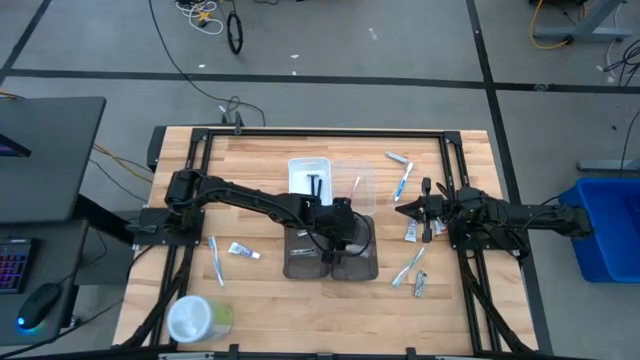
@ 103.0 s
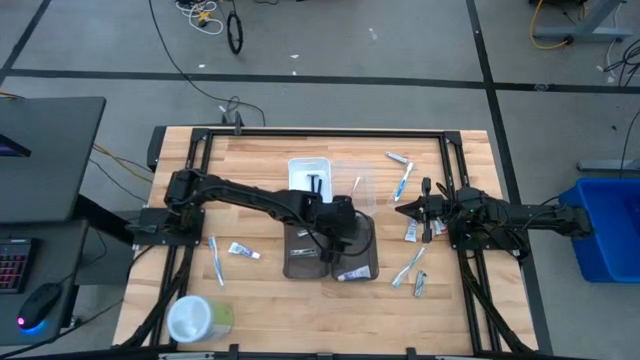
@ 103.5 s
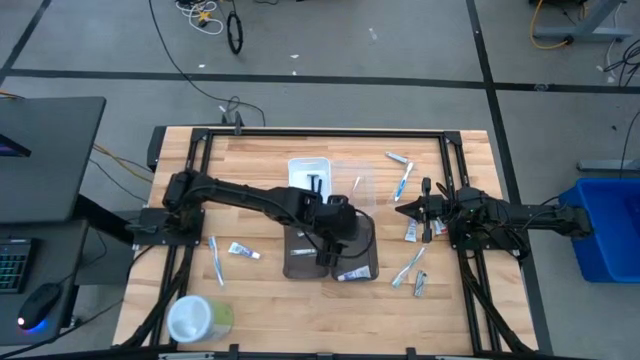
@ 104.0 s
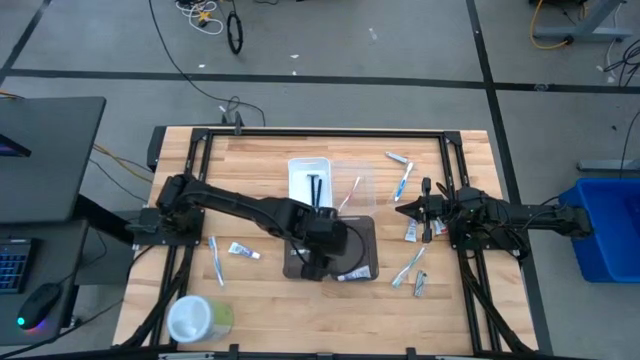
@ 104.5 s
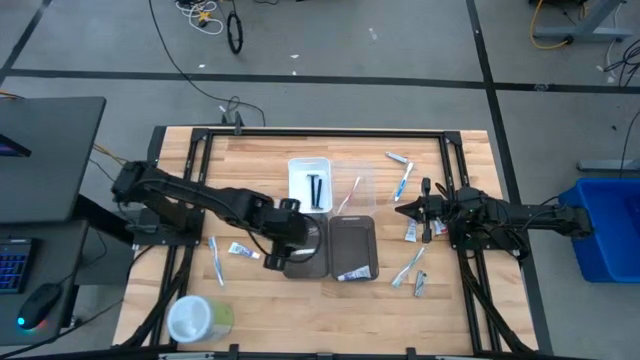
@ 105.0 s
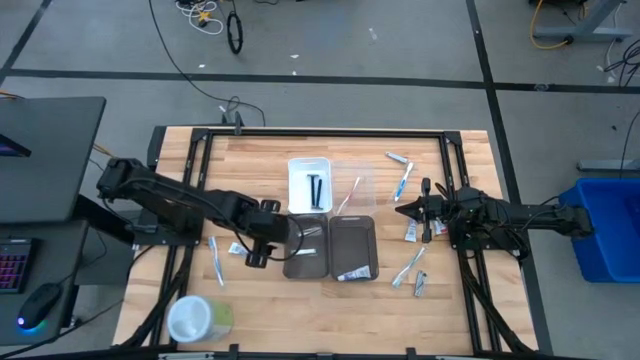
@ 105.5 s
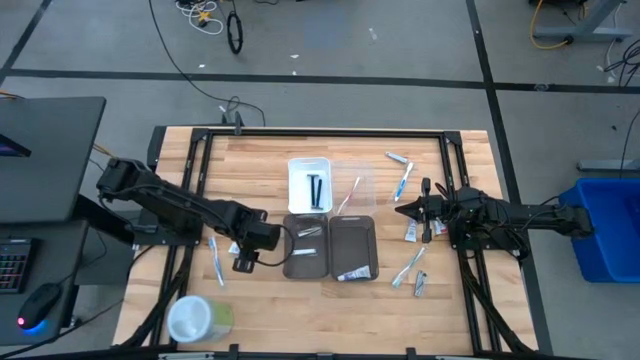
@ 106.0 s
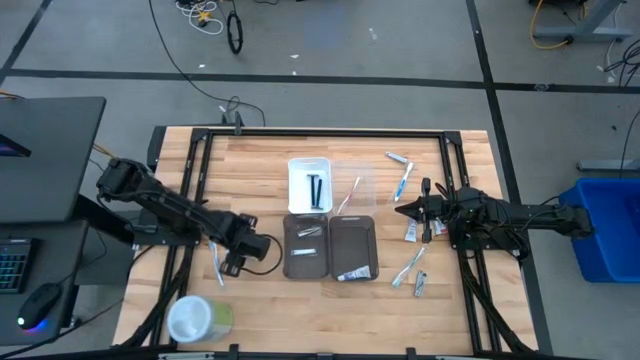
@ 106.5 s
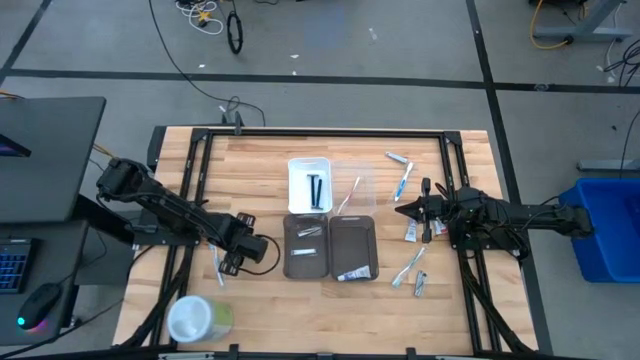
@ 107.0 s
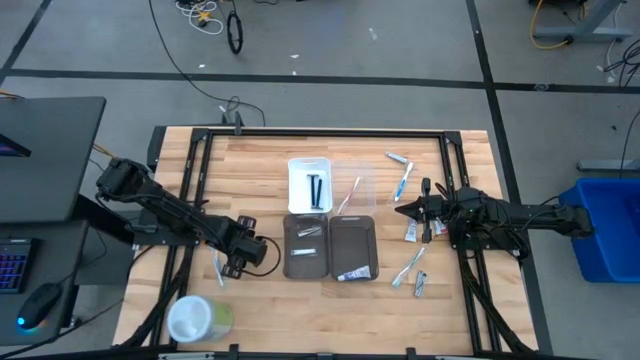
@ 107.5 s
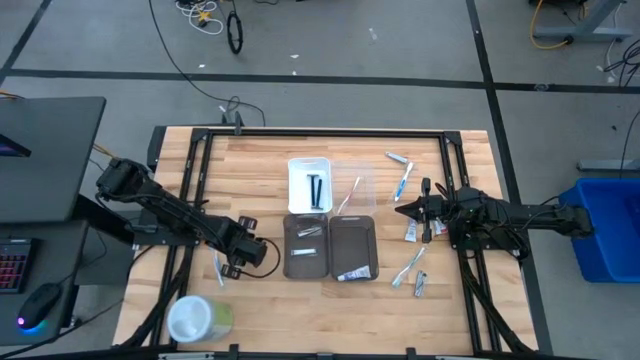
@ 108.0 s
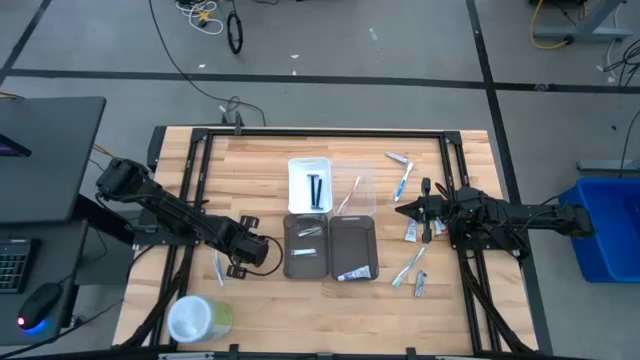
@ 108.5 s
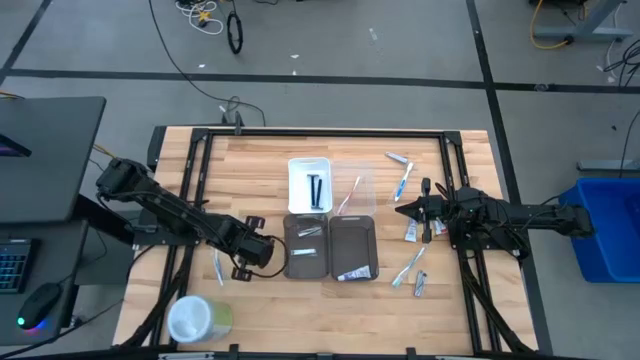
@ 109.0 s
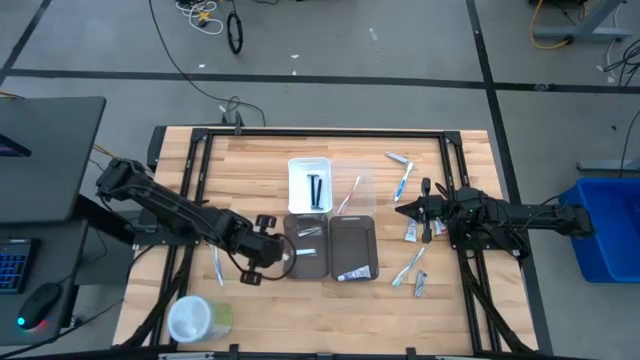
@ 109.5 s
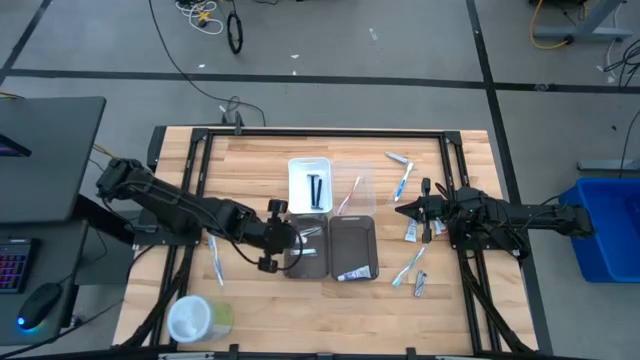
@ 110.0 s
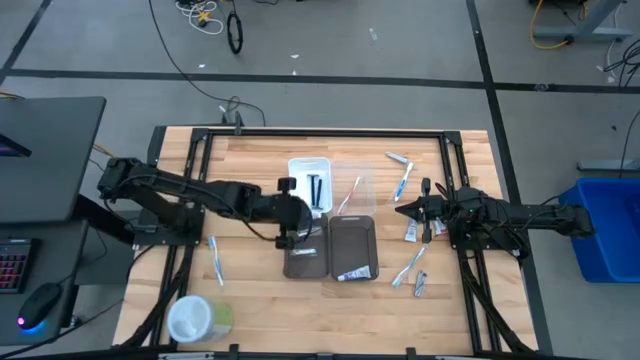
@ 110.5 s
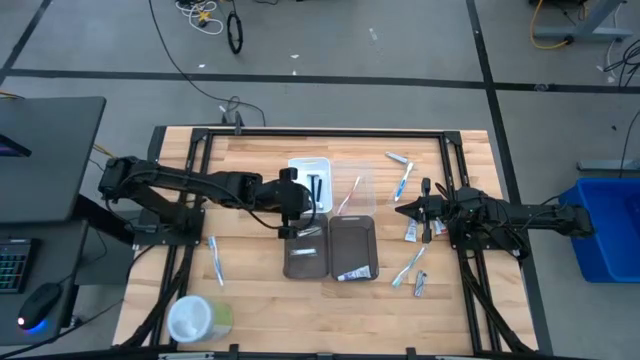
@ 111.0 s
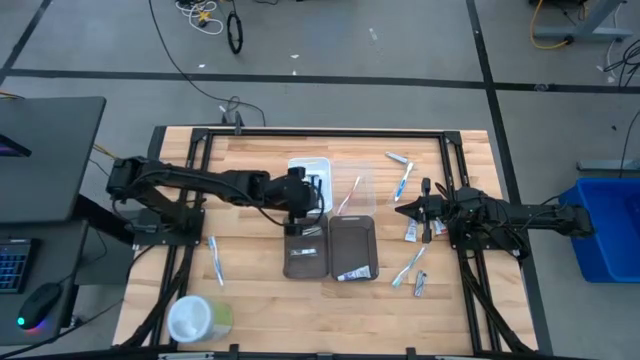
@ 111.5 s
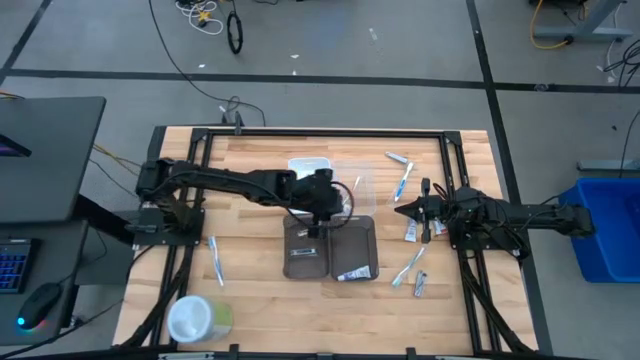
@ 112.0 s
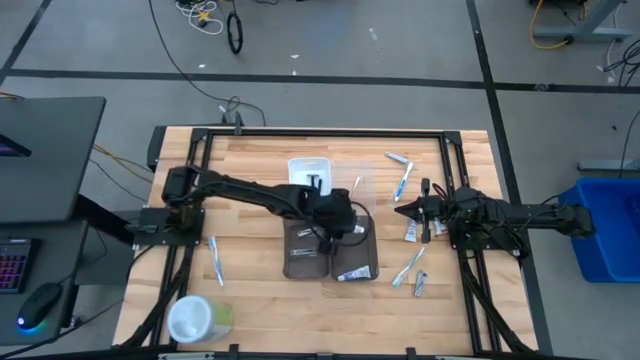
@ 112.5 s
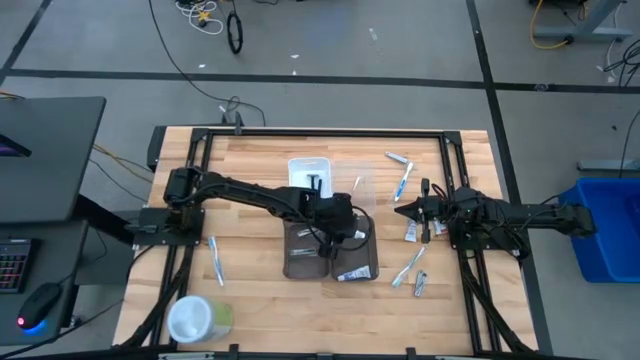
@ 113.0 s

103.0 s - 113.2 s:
Task: Pick & Place Travel size toiletries
Put the white toothpaste into the right black bin

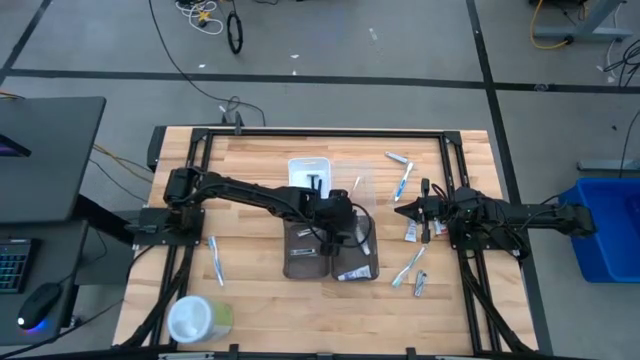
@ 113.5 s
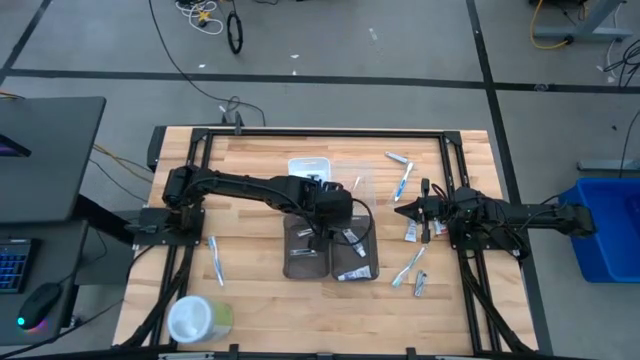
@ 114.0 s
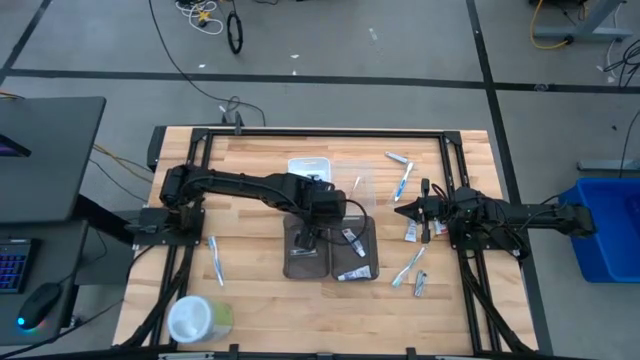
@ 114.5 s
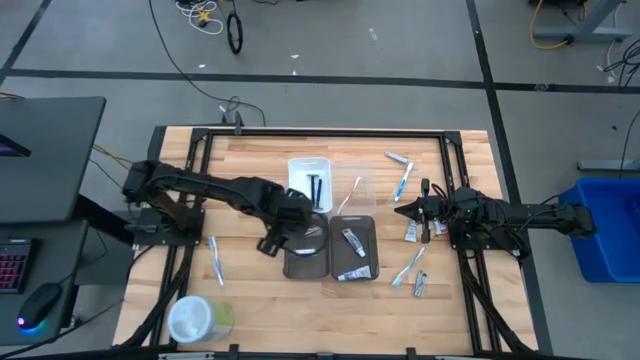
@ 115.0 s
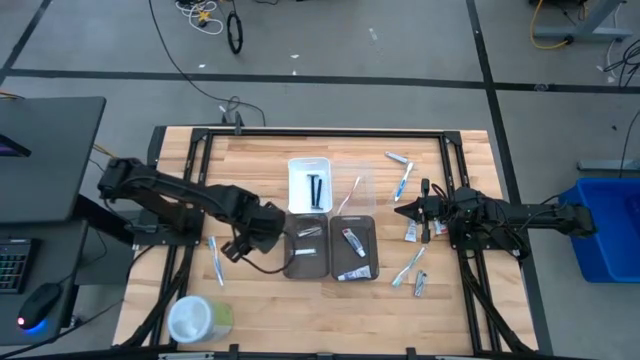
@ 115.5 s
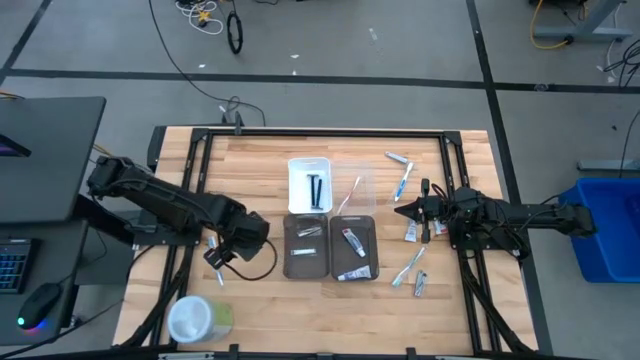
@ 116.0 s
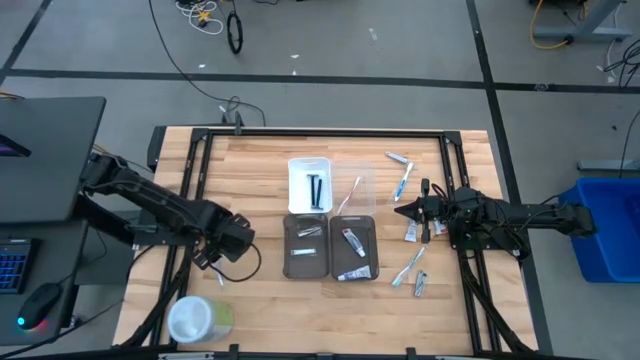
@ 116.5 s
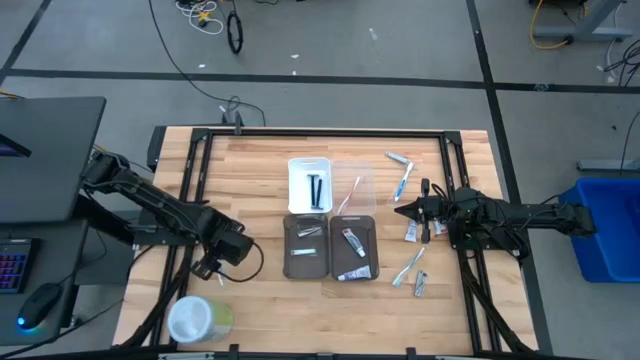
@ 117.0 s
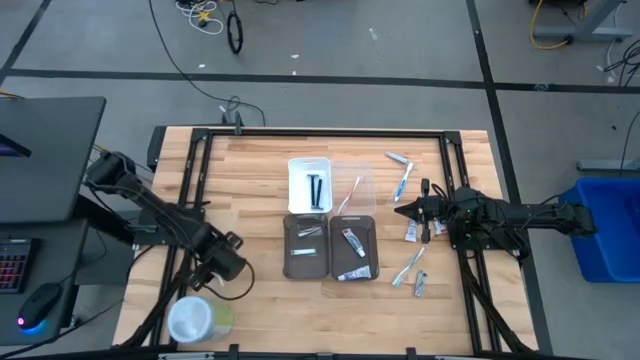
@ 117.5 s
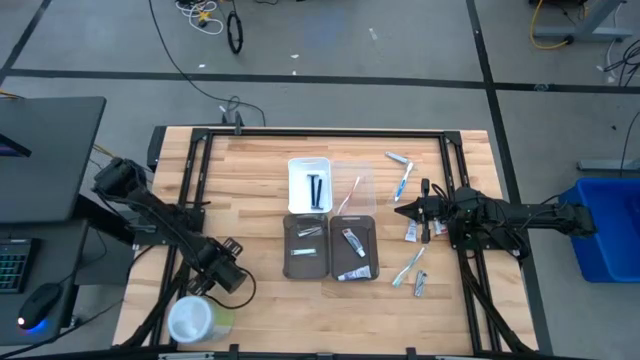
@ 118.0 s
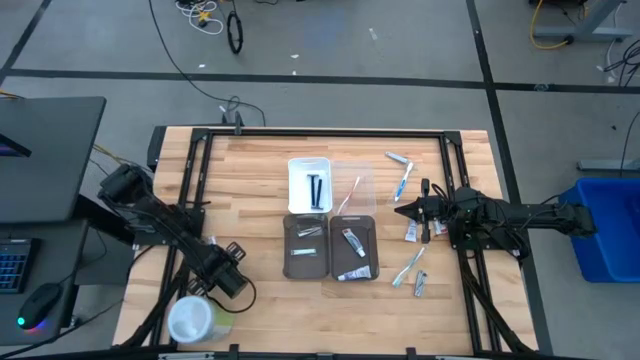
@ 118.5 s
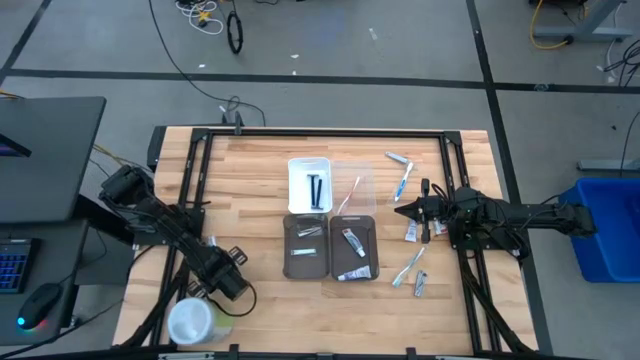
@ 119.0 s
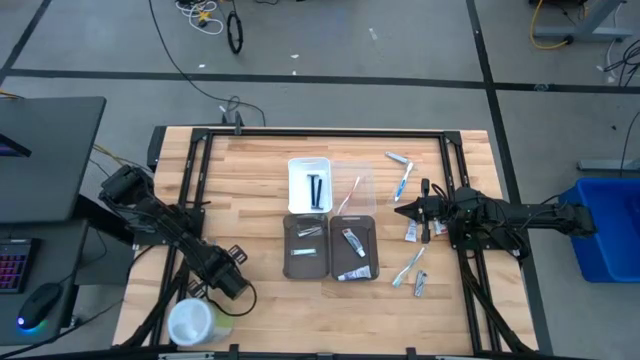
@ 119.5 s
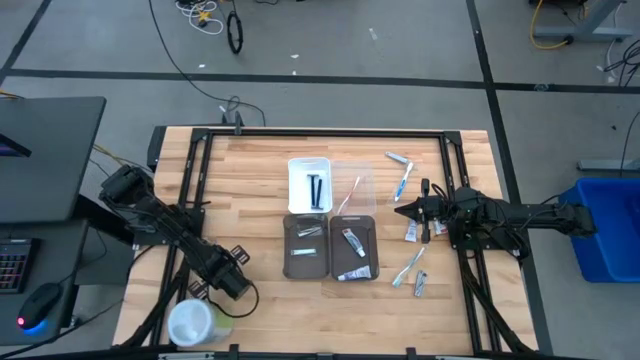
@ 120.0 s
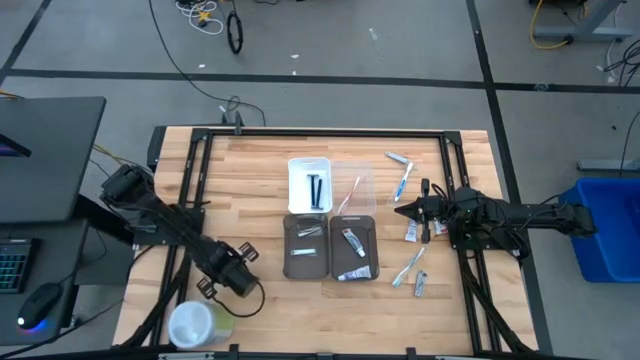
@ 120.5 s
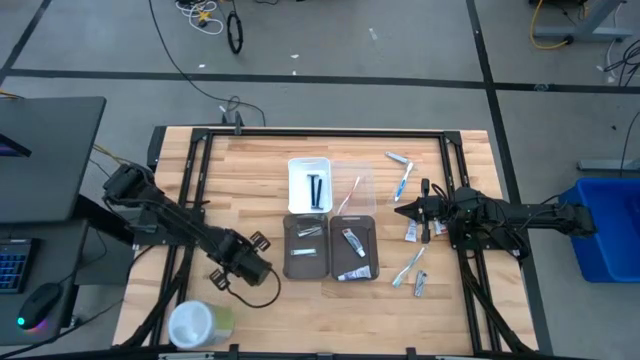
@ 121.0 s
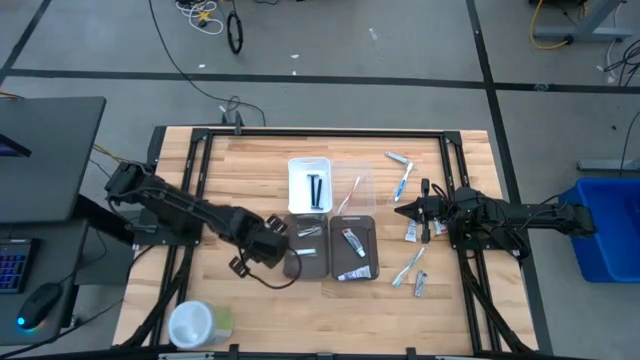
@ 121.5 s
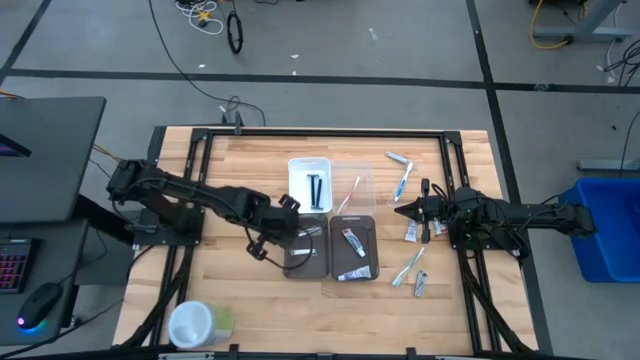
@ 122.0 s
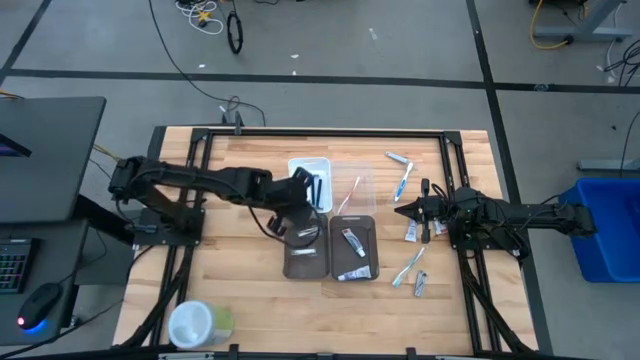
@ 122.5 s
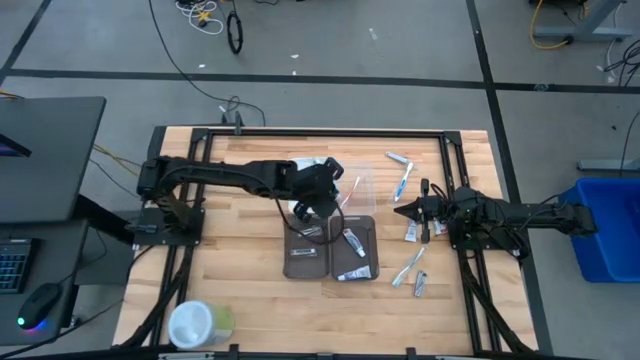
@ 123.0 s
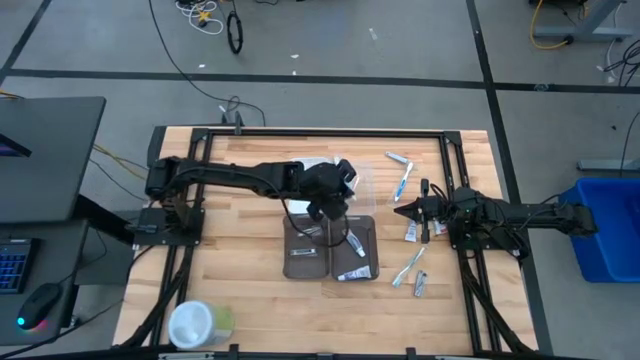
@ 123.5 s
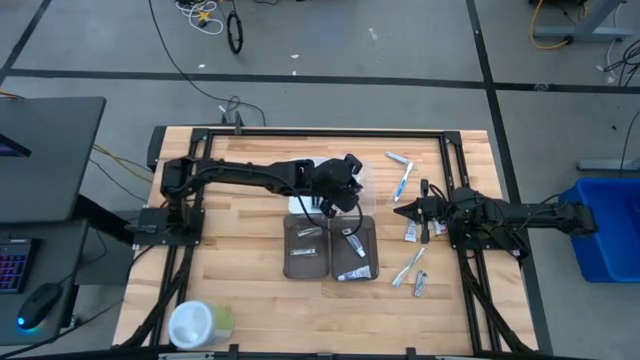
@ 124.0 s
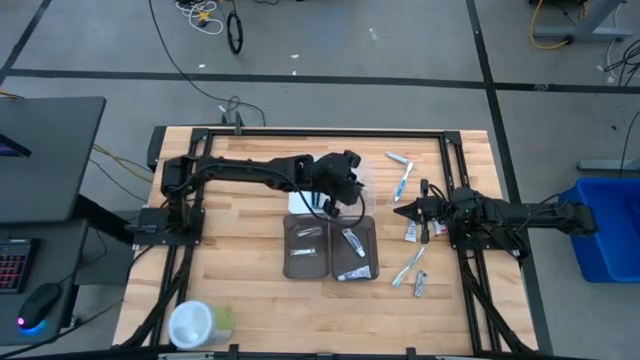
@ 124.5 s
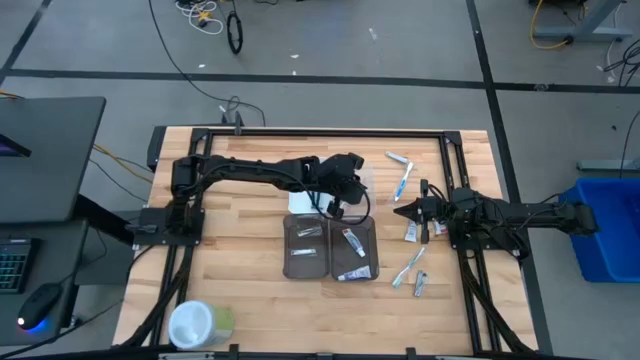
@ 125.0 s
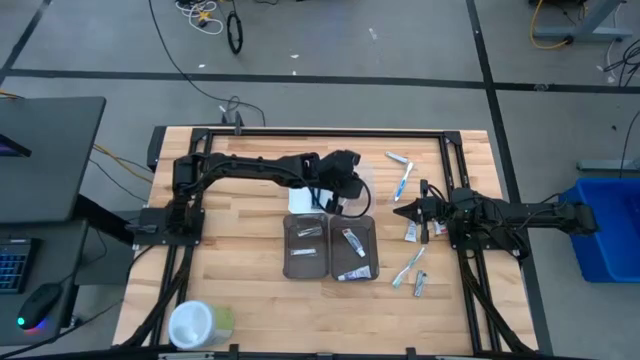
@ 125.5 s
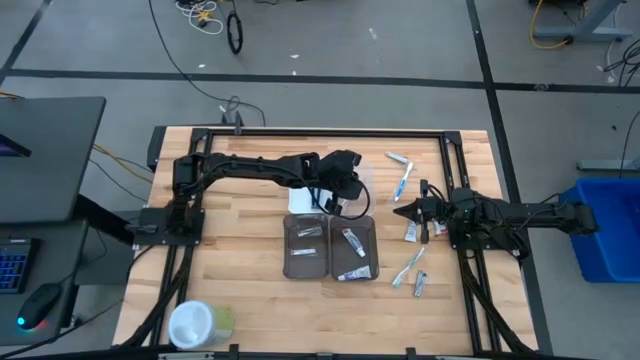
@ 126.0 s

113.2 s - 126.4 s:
Put the blue toothbrush into the transparent bin
